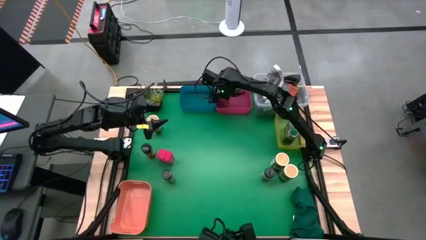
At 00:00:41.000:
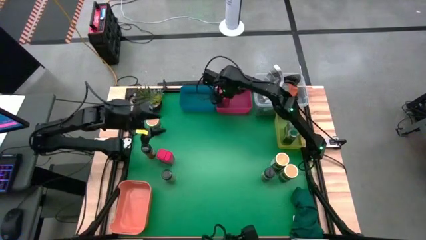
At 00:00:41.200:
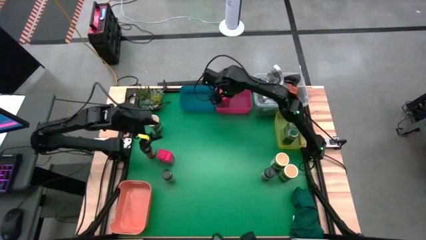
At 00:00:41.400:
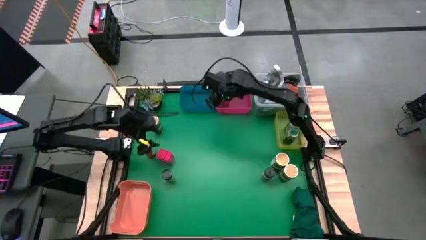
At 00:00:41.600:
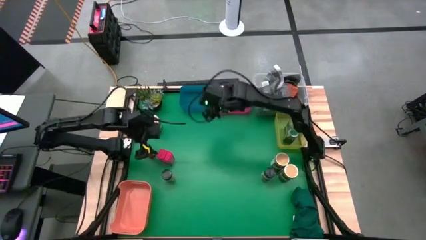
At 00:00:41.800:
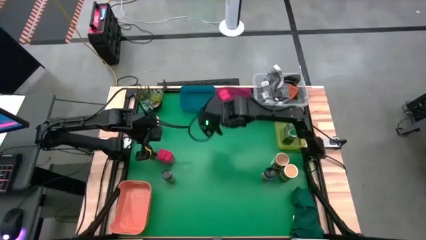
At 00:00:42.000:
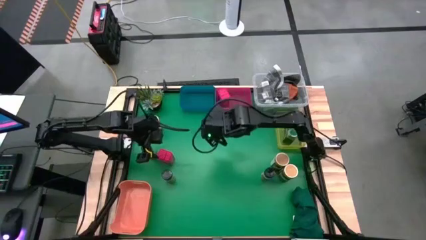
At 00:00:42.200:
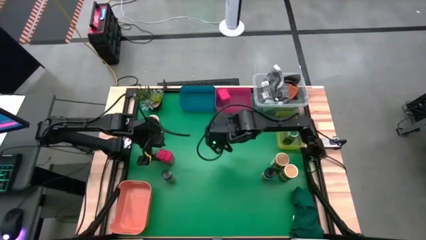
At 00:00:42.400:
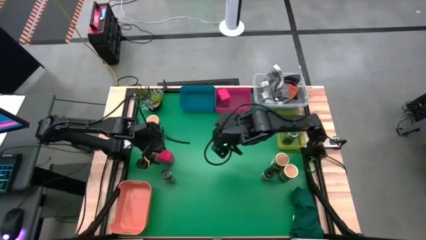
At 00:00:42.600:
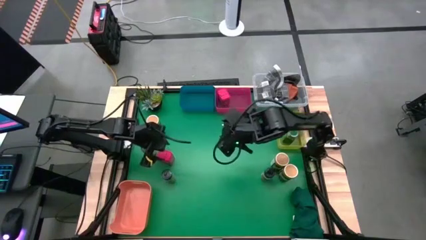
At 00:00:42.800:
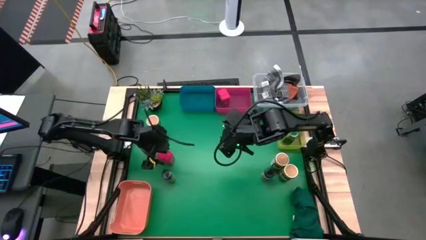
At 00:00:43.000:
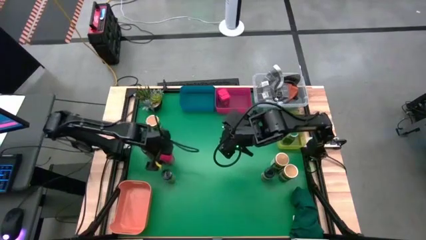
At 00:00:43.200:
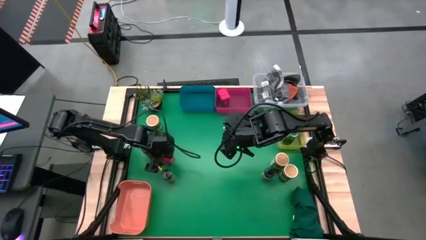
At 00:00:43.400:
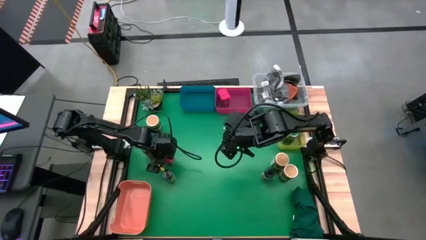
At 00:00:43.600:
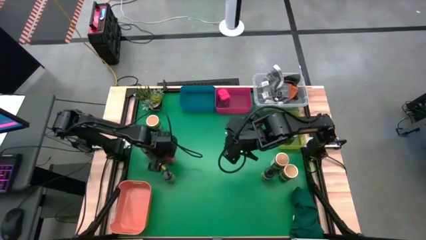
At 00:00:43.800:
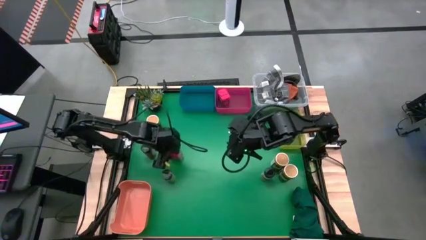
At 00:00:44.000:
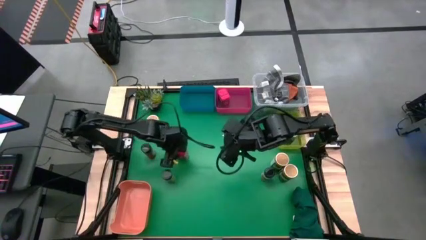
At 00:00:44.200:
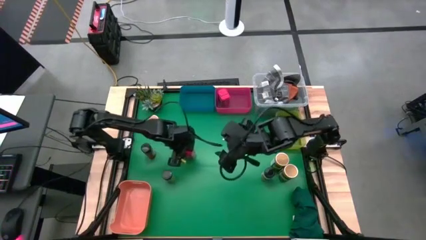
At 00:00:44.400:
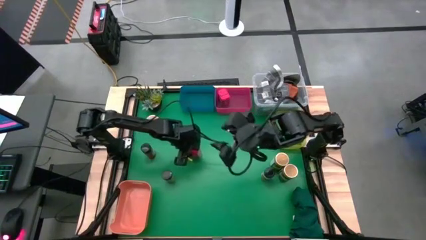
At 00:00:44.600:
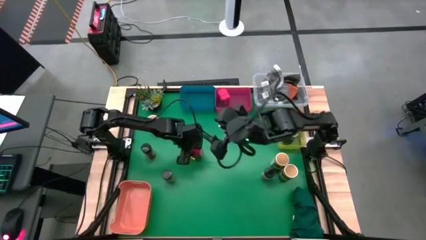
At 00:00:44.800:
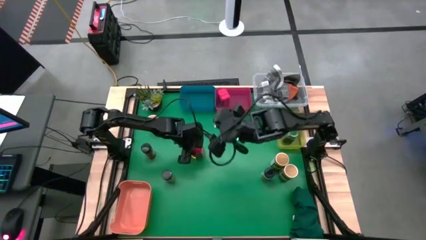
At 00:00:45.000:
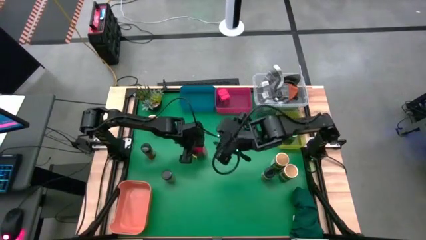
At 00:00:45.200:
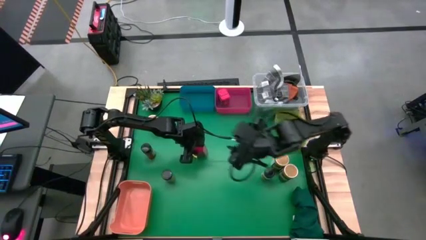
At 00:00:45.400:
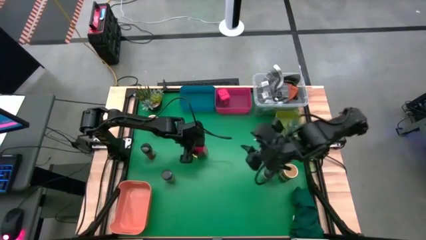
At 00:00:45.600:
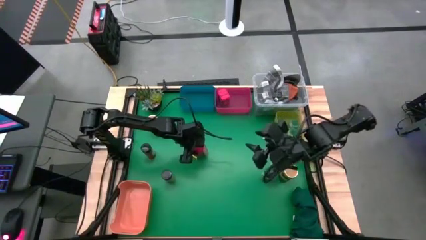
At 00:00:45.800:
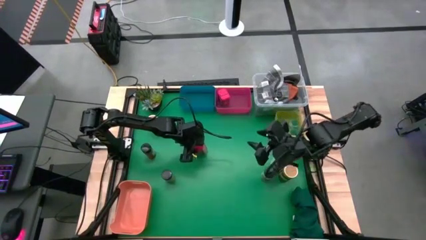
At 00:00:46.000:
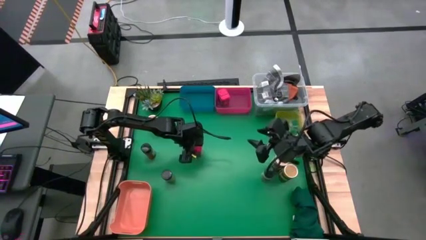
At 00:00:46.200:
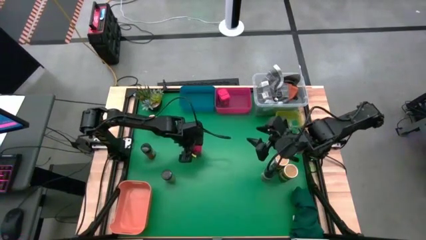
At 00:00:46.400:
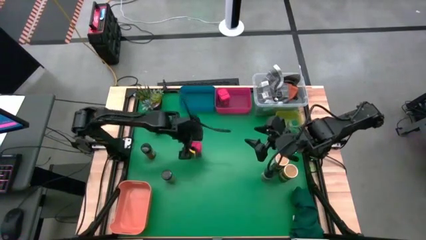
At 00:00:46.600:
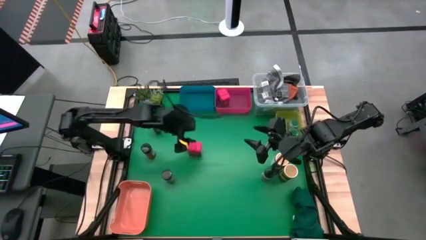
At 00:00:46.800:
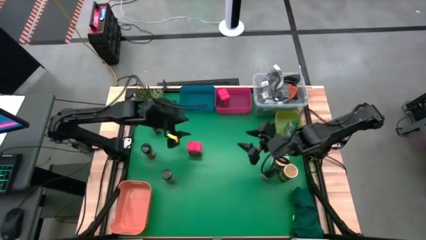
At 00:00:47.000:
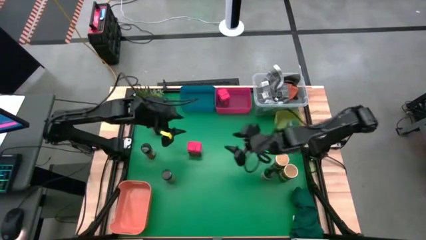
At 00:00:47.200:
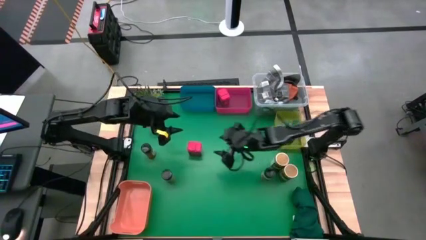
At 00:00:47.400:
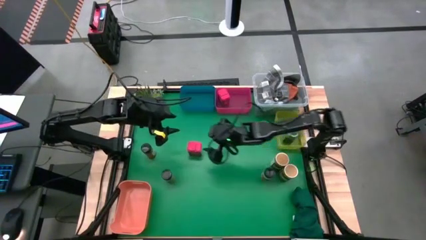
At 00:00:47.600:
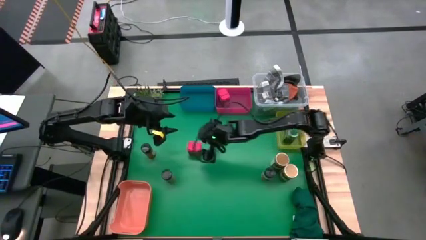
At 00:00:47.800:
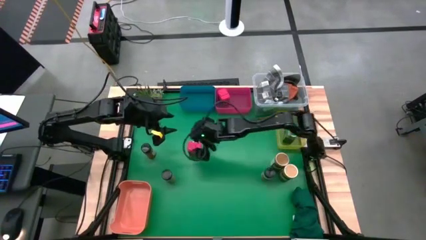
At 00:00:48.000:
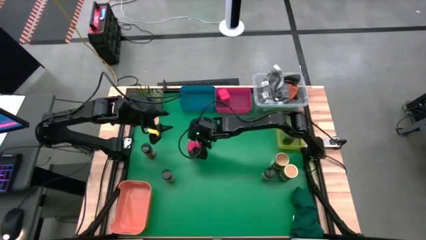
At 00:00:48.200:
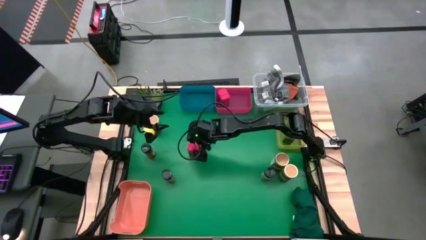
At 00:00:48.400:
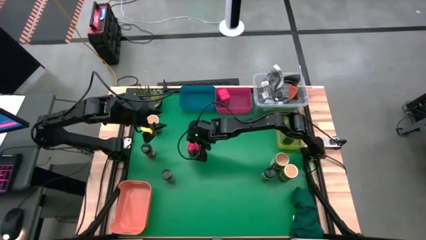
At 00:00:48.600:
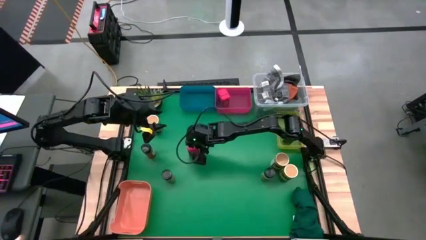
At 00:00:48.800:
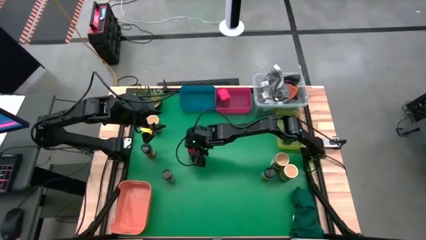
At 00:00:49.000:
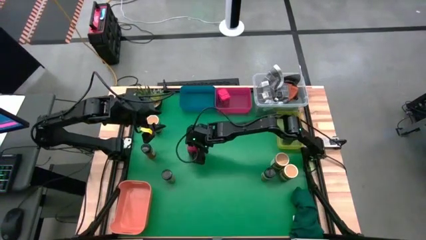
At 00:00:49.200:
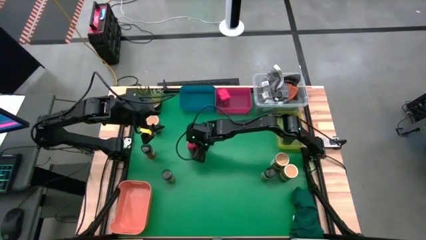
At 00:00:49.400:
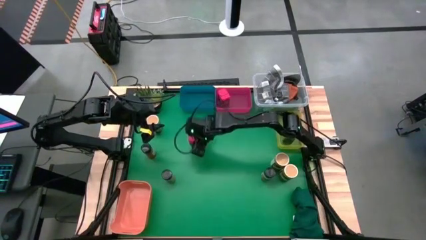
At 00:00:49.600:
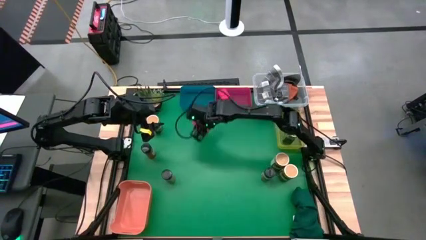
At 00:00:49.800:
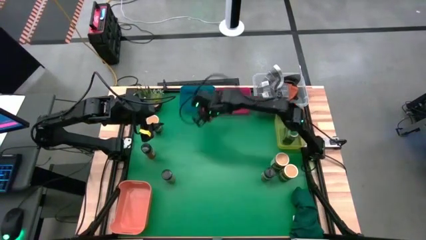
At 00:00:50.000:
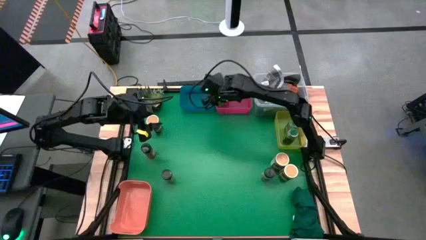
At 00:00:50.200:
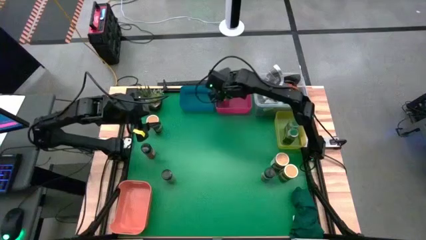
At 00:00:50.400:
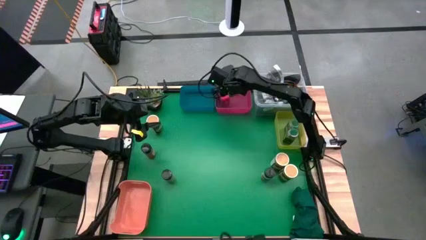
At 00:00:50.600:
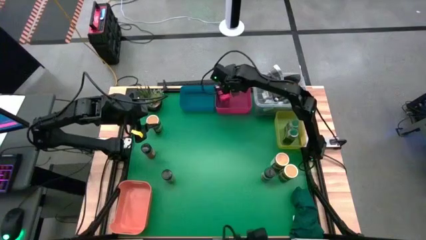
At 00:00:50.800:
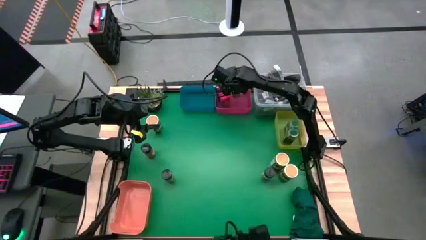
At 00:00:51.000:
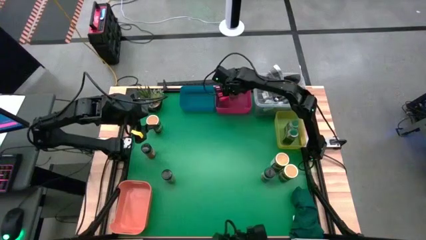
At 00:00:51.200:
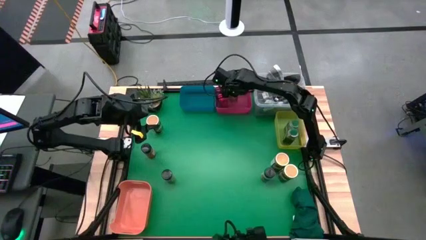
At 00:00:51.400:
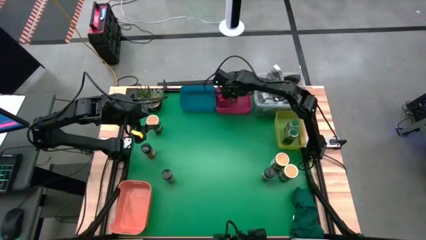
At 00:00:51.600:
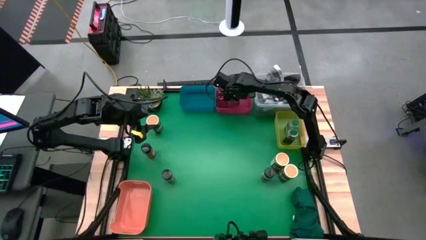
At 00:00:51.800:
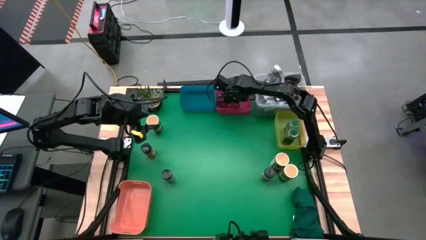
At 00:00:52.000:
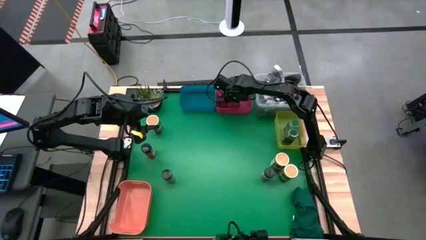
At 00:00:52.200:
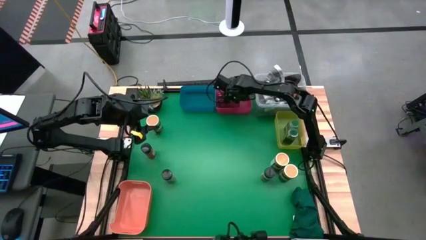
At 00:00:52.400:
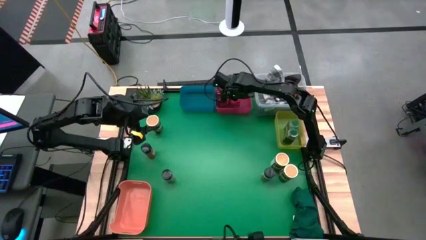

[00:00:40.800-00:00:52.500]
Task: Sort spices by type
Put the red spice can into the red bin

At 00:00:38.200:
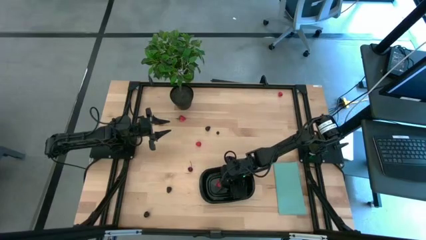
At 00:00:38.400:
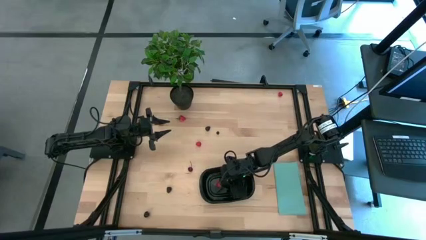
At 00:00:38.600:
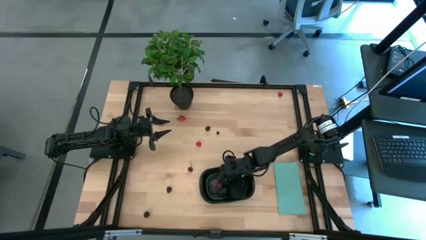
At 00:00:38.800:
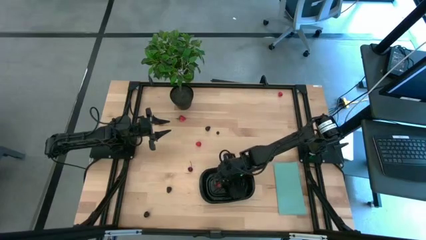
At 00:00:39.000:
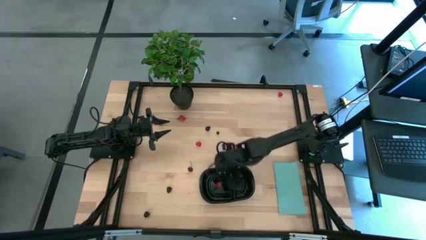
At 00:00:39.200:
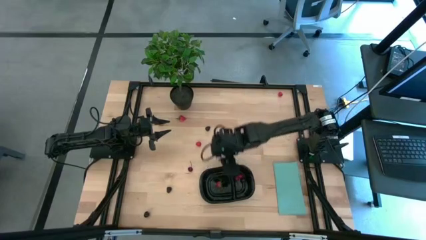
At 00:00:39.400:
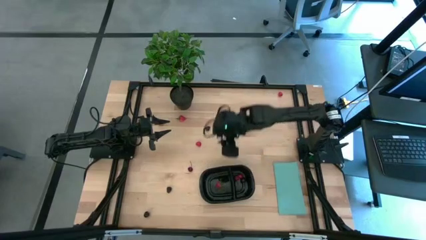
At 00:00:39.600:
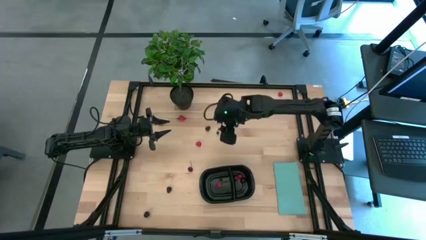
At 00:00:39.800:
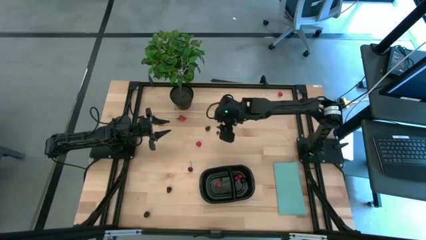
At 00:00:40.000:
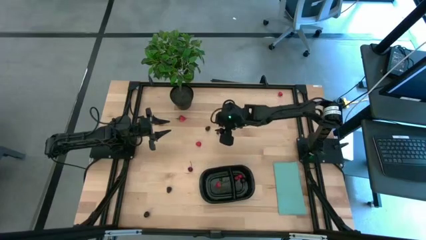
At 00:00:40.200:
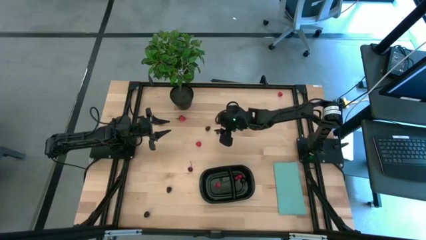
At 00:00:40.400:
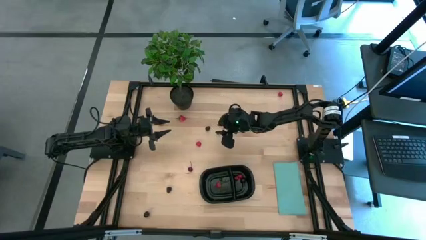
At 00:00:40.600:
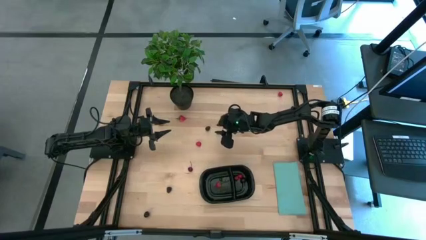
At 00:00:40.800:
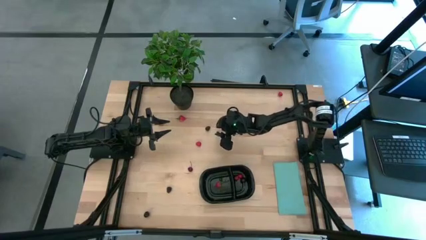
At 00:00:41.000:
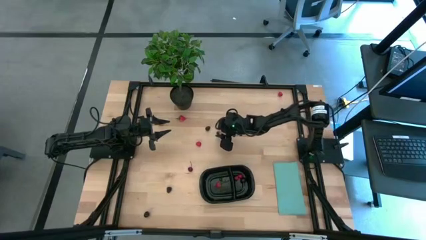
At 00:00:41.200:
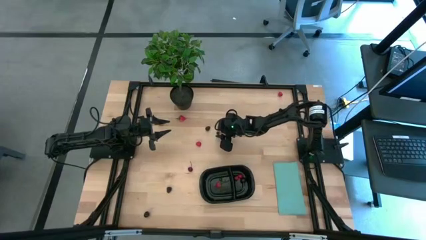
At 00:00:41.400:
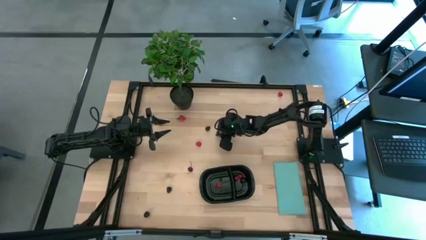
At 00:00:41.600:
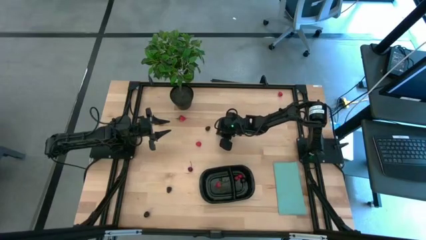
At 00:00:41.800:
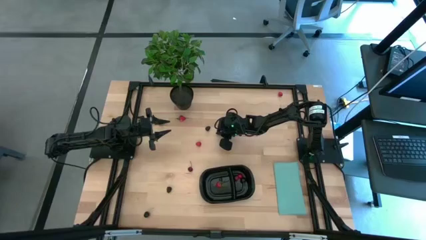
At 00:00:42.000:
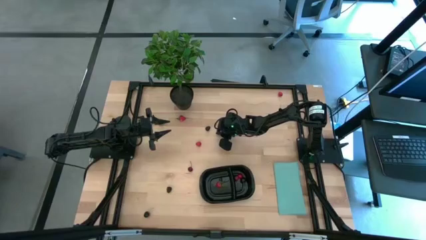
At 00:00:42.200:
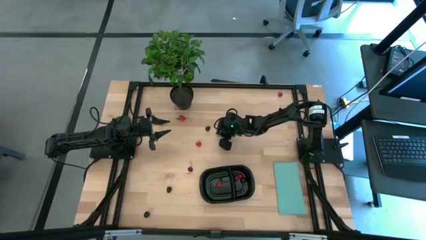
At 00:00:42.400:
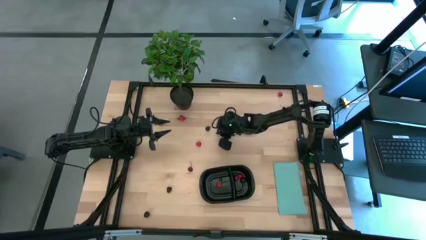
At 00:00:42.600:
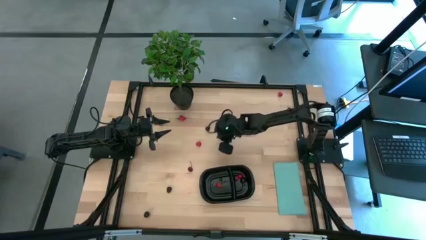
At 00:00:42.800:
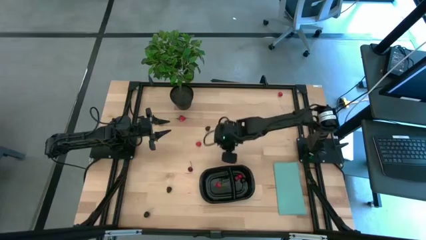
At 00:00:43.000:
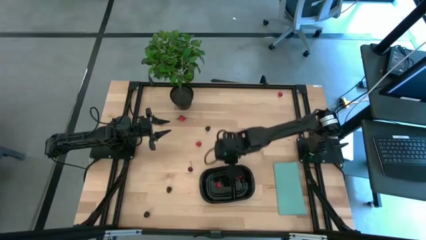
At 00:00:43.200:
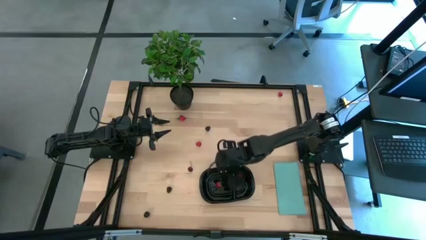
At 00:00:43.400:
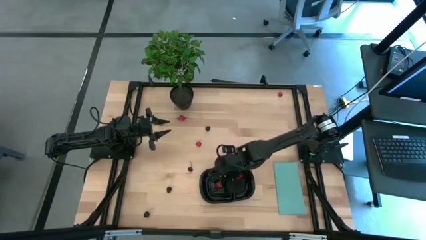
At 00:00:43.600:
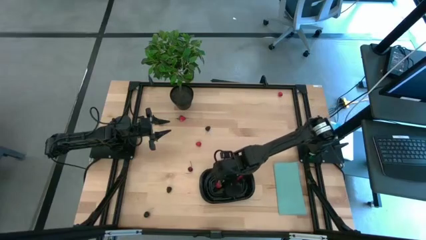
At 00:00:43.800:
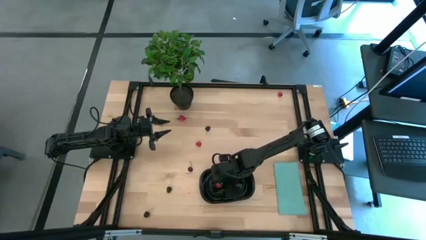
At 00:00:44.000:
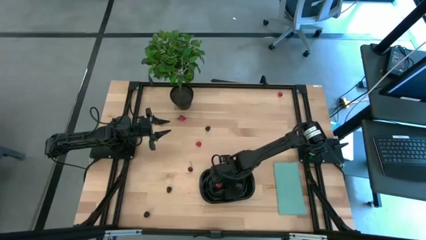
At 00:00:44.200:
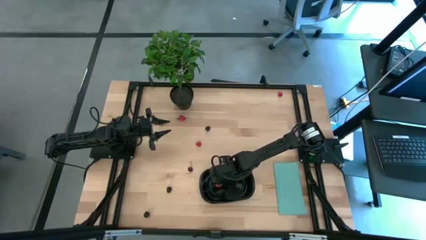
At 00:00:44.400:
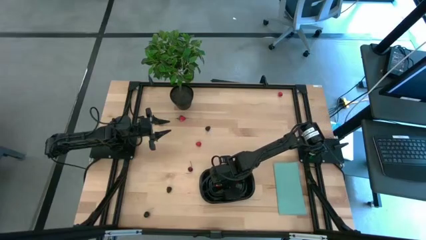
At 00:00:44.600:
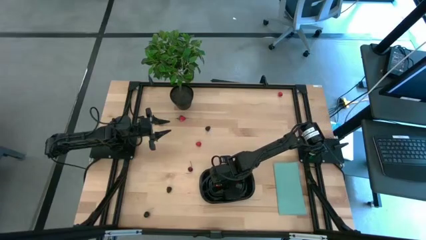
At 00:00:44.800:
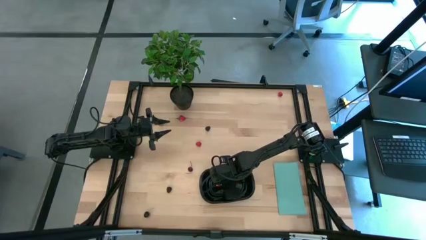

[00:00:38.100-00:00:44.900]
Task: Pick and placing Produce into tupperware
Put the blueberry into the left side of the black container
